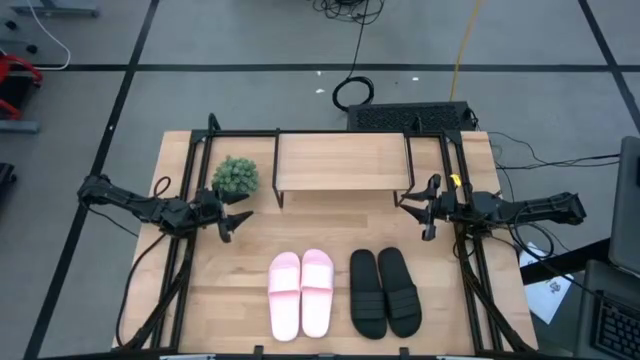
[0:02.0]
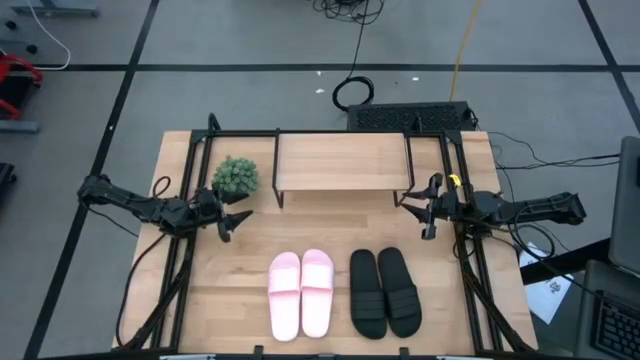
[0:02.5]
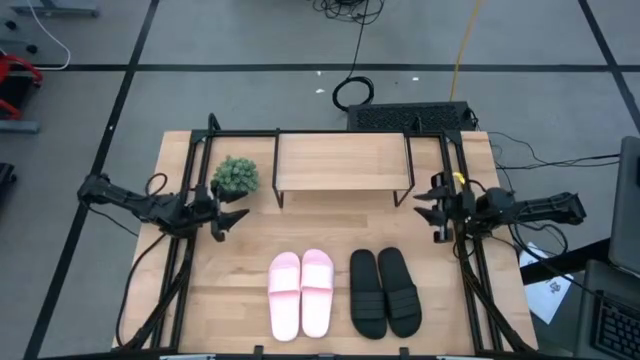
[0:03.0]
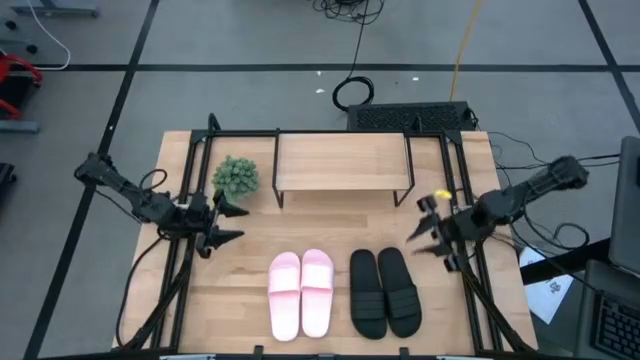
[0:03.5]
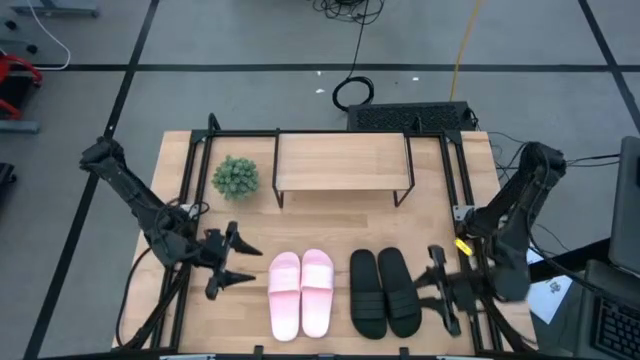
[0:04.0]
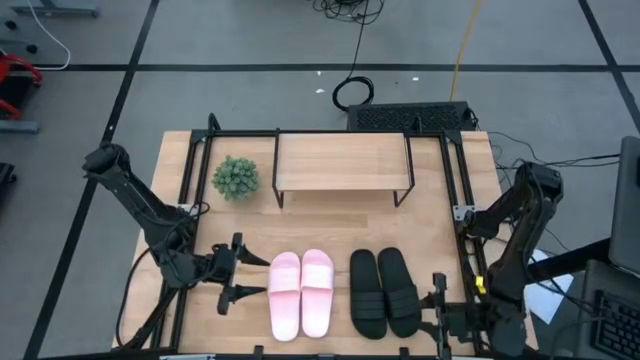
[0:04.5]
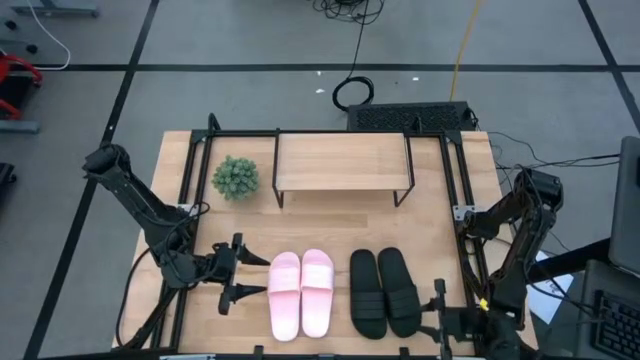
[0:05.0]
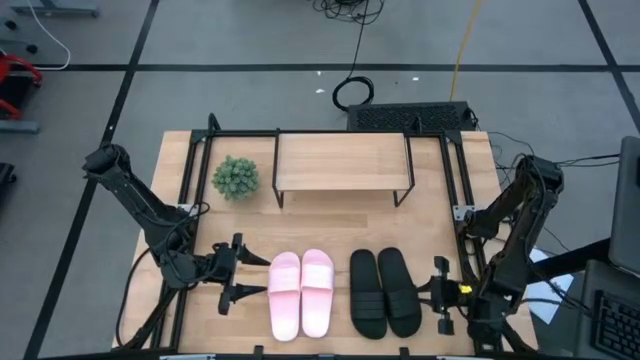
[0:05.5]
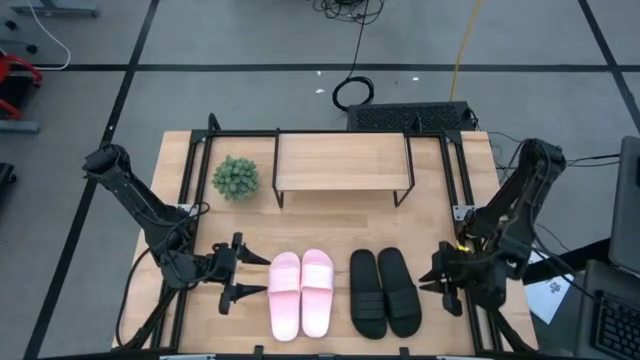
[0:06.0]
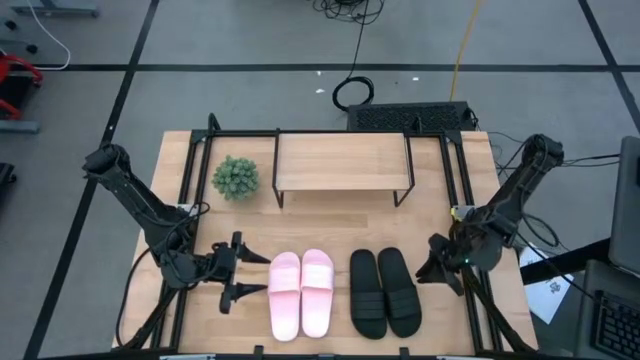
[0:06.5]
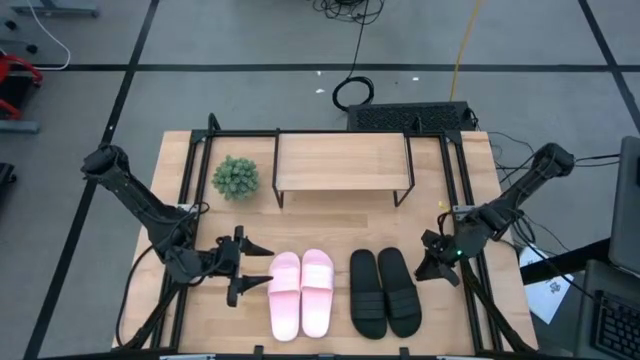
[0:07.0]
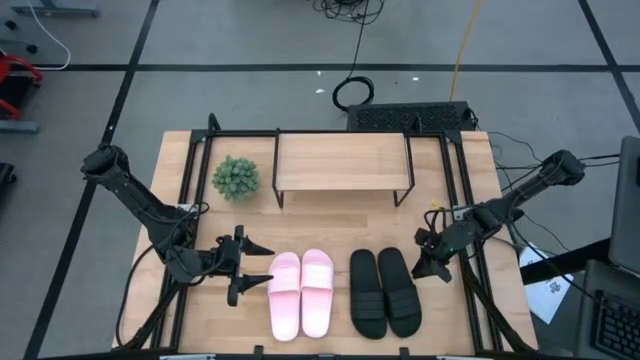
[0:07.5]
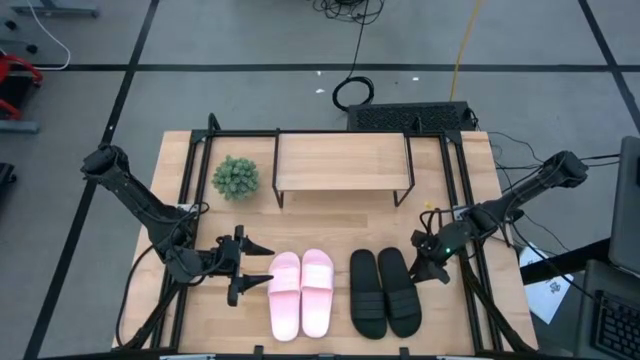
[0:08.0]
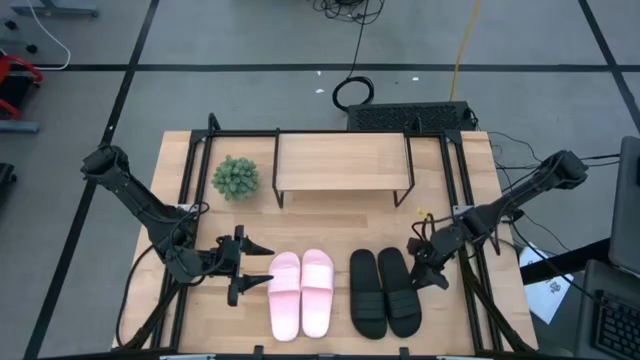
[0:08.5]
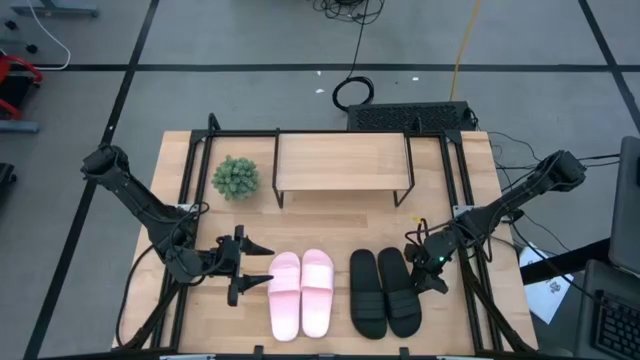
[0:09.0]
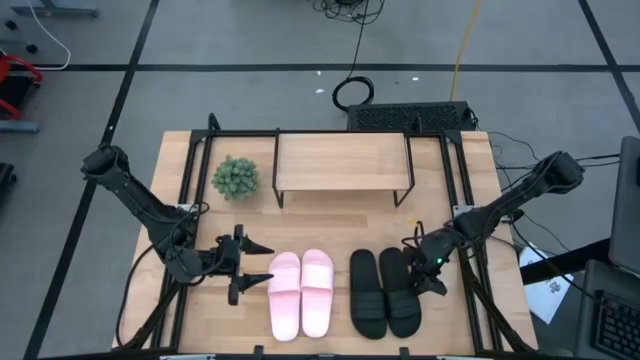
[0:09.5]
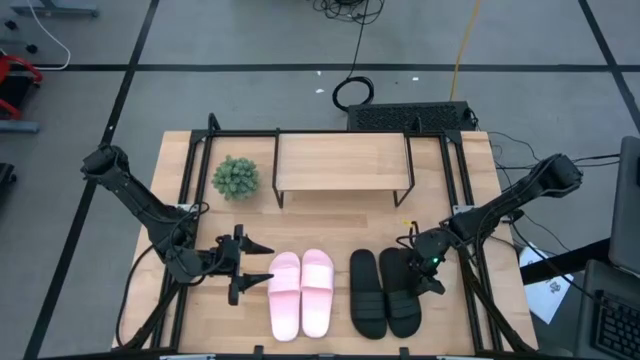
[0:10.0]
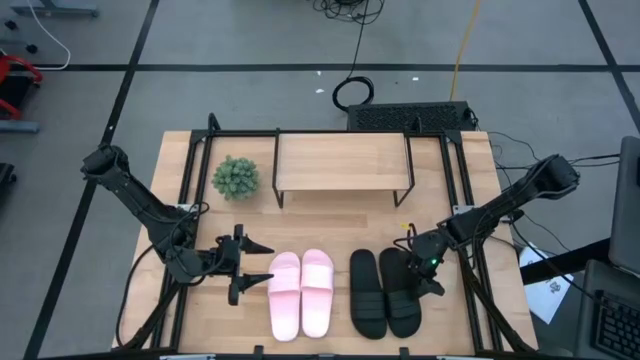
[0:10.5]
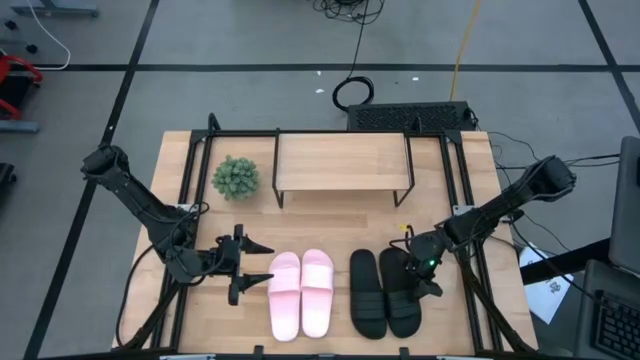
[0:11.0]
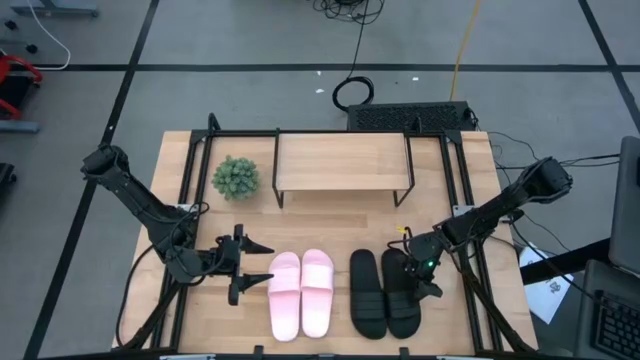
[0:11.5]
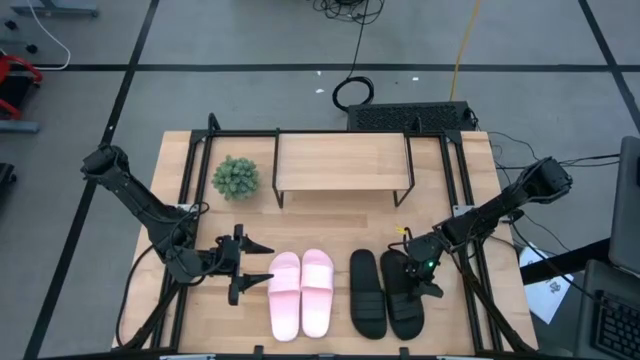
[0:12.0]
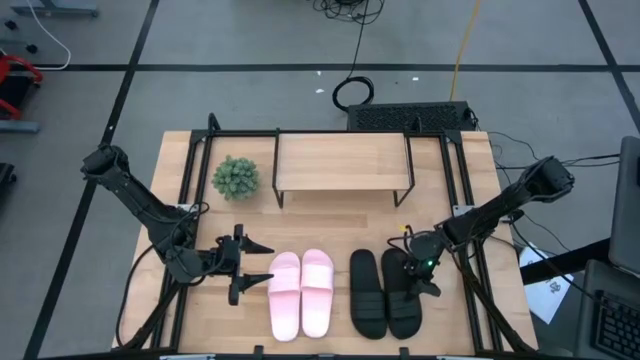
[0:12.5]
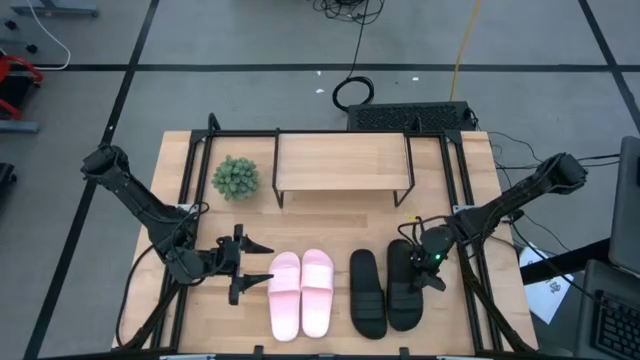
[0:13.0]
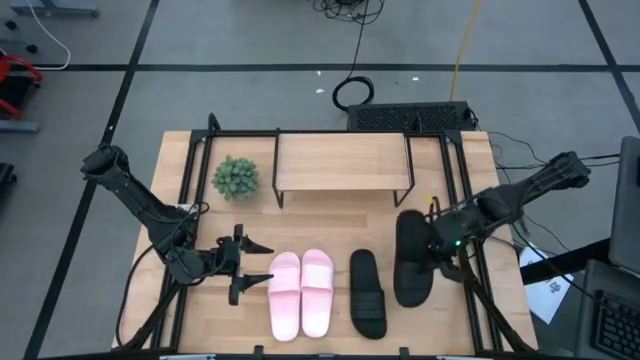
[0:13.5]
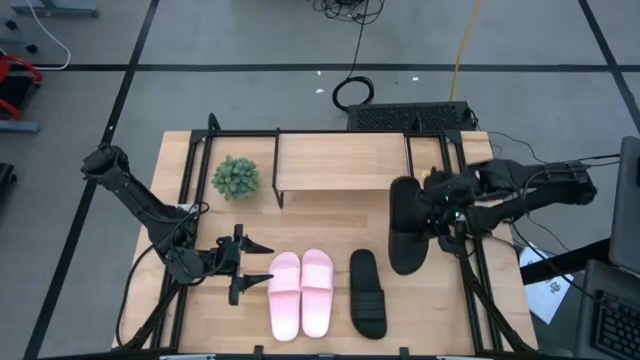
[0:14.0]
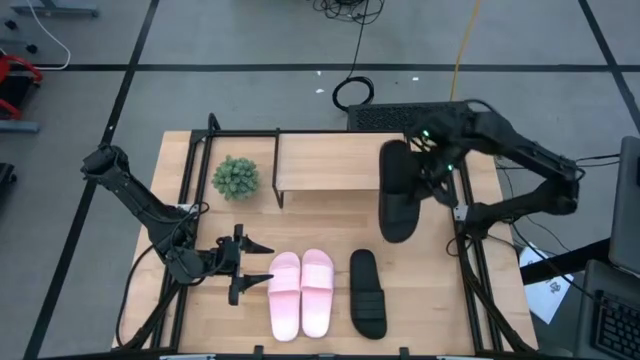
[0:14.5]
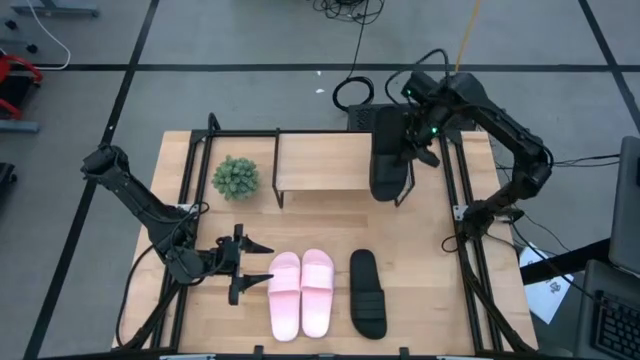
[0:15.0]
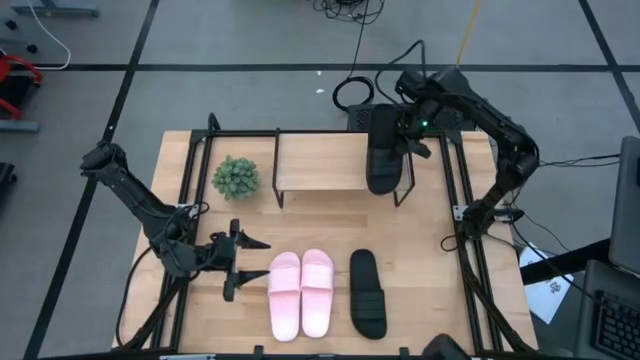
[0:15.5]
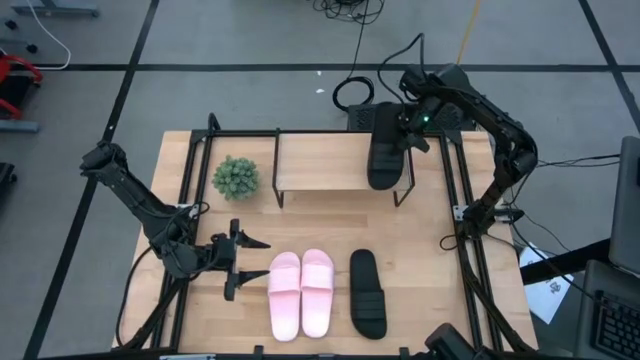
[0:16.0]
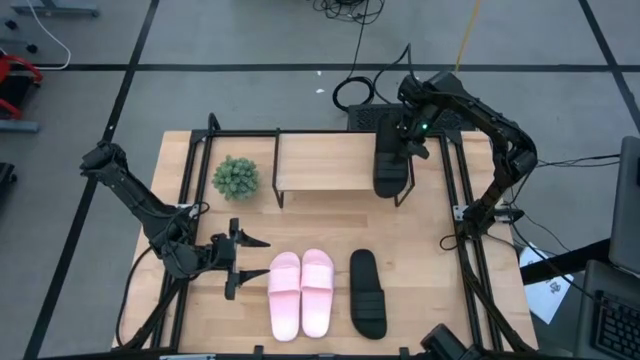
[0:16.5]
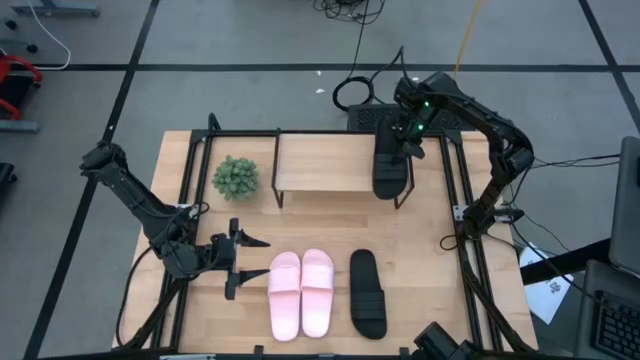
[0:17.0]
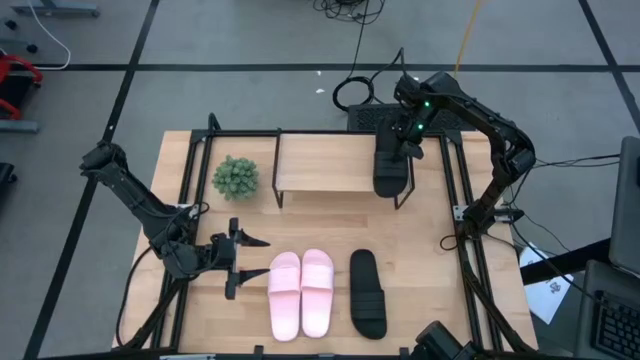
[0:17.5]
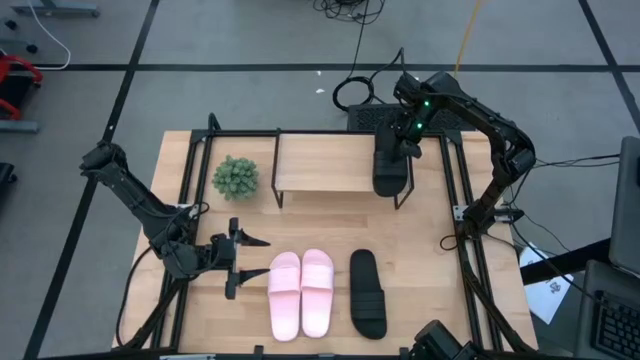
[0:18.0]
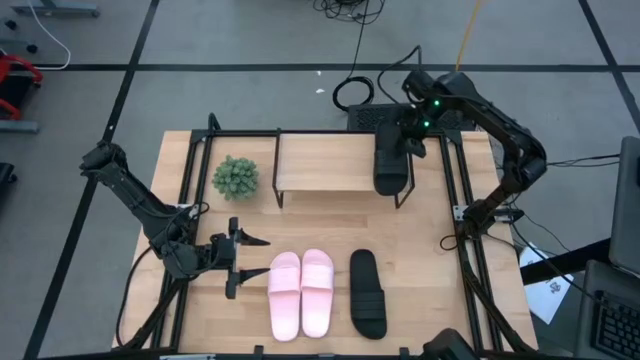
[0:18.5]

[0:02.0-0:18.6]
Task: Pick and place slides into the shelf
Put the right black slipper on the shelf
